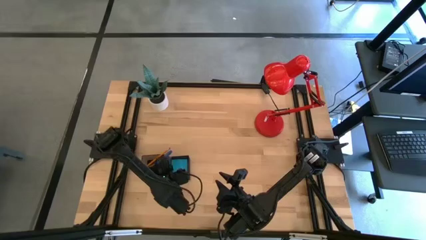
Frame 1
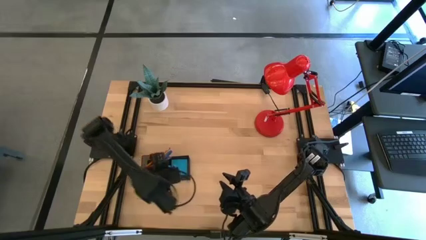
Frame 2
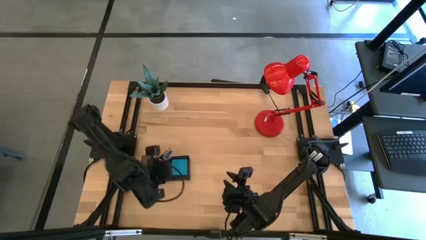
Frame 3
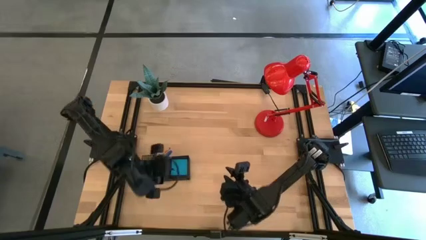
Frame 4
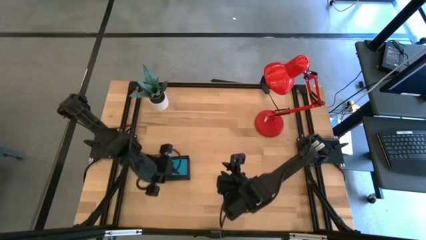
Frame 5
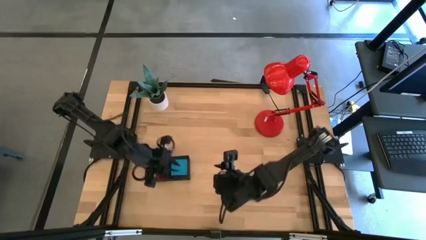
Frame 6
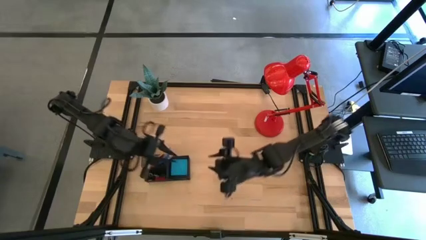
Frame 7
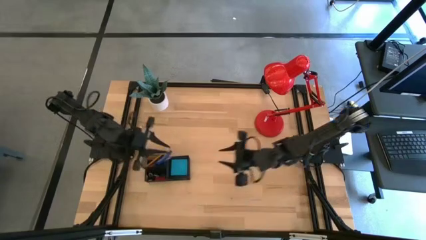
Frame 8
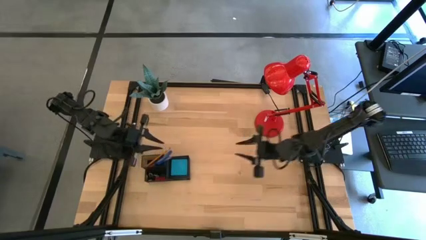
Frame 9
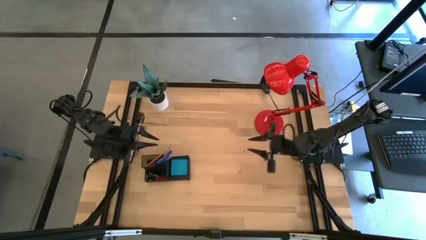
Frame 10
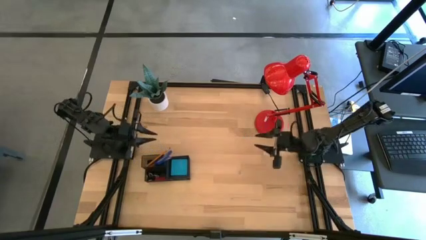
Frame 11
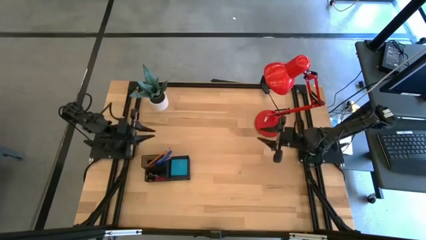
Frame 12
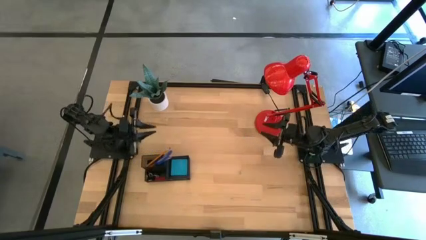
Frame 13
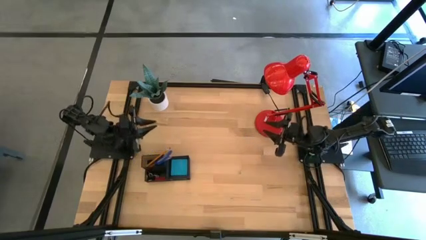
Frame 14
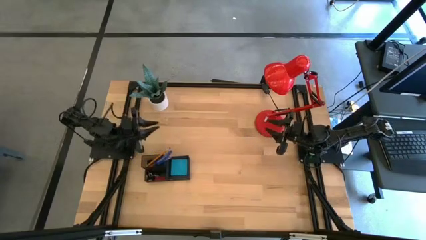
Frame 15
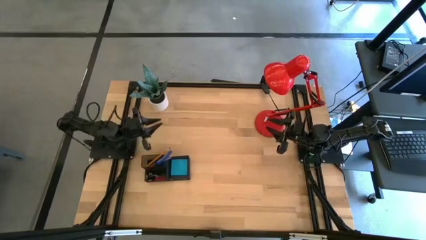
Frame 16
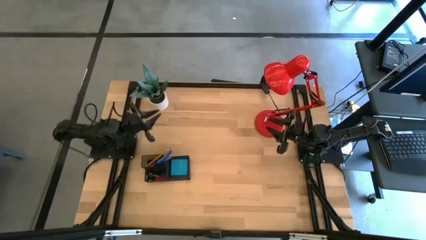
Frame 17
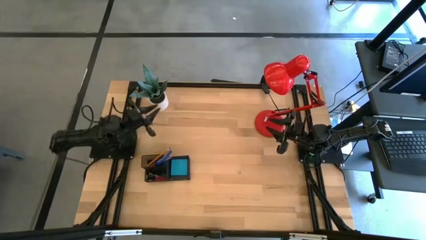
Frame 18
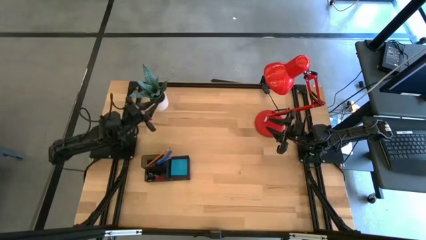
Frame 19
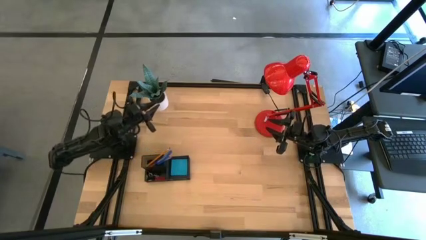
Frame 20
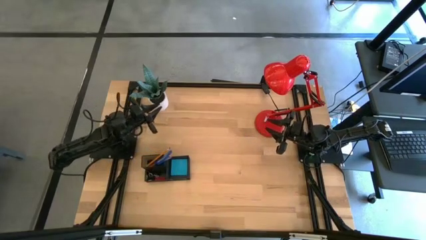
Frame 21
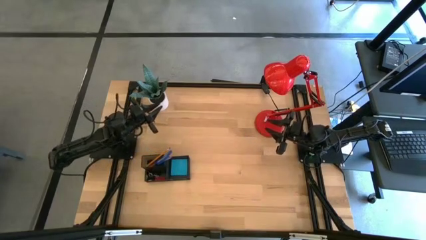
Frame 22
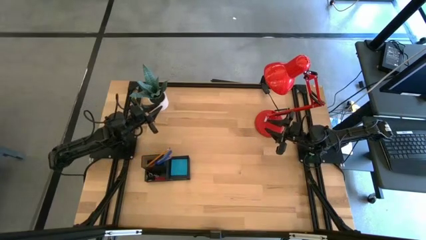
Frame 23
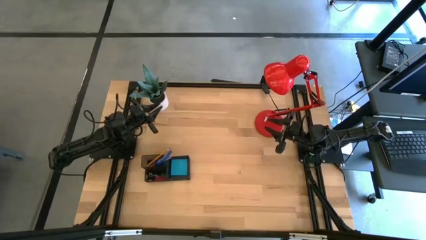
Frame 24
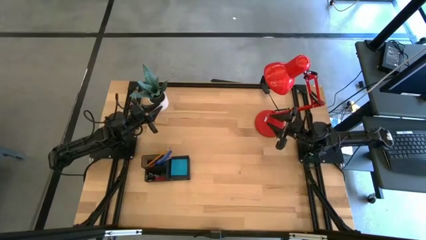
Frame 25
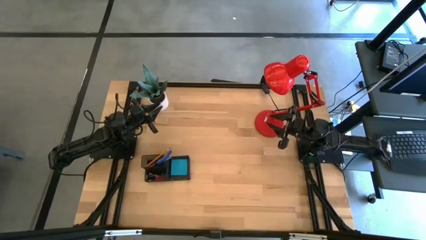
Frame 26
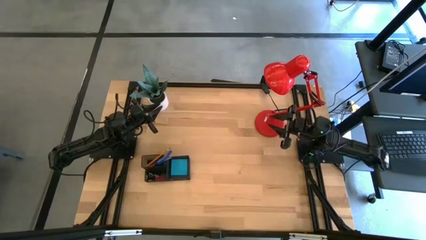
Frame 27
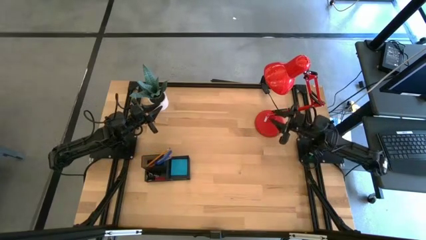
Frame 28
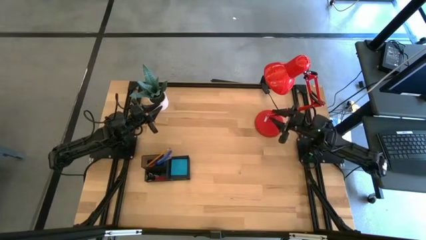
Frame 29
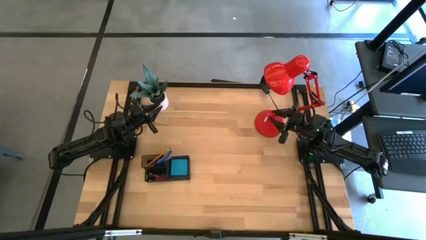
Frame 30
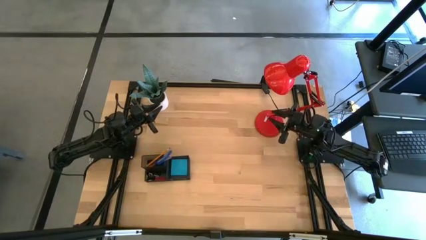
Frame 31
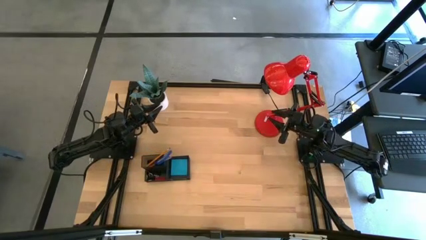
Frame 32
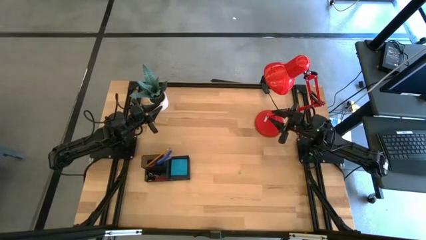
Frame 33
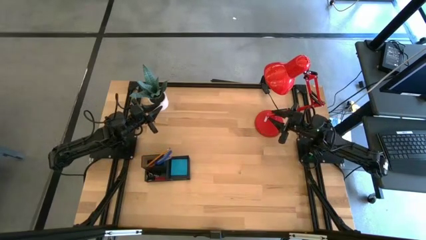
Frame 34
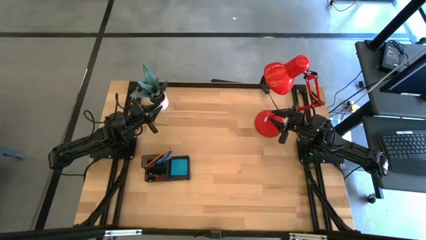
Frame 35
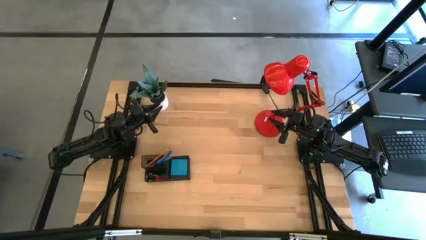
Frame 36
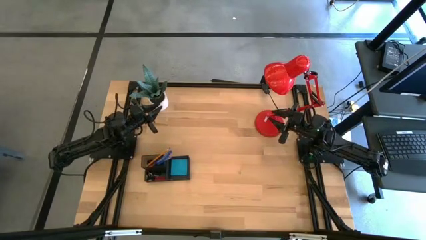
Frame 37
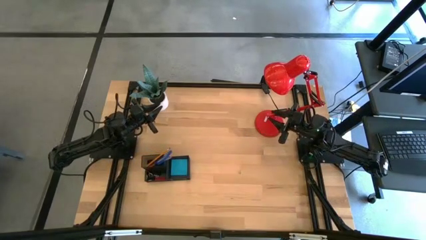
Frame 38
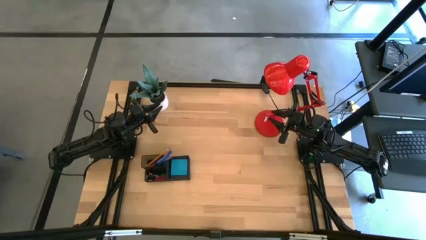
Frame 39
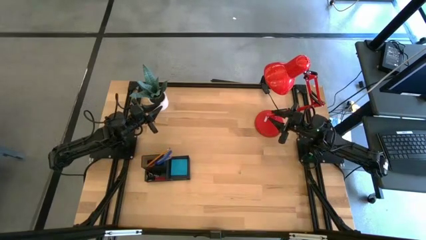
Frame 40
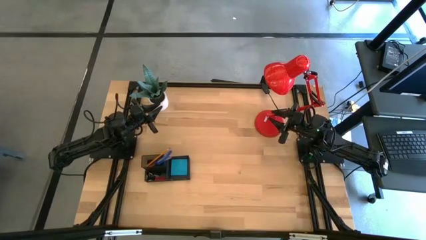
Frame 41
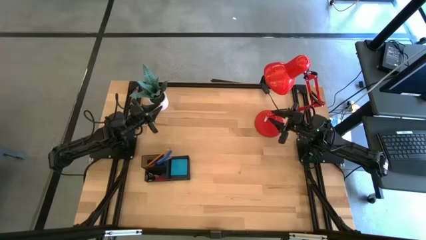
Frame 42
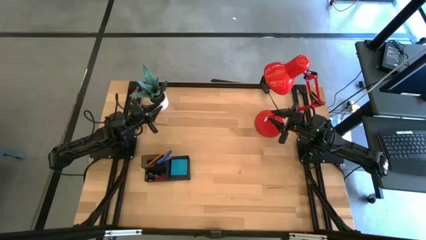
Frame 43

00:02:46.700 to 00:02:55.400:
Task: Pick and place office supplies into organizer
Return to Home Position
